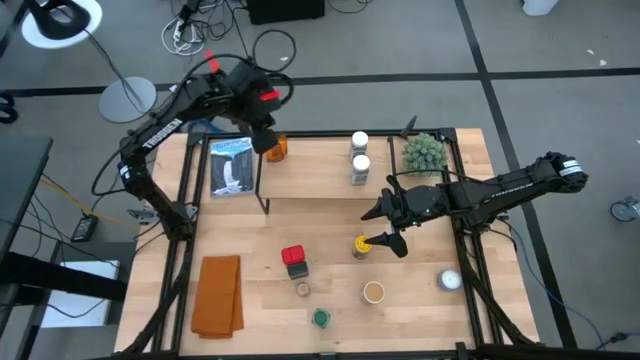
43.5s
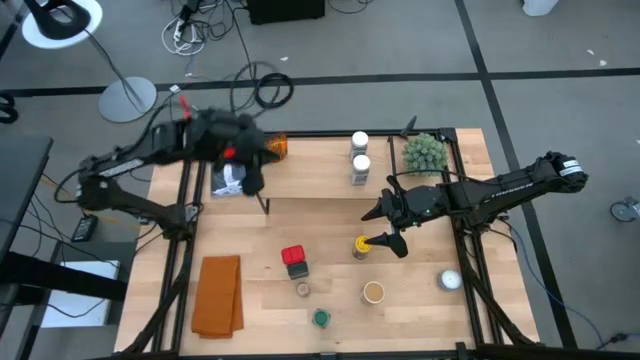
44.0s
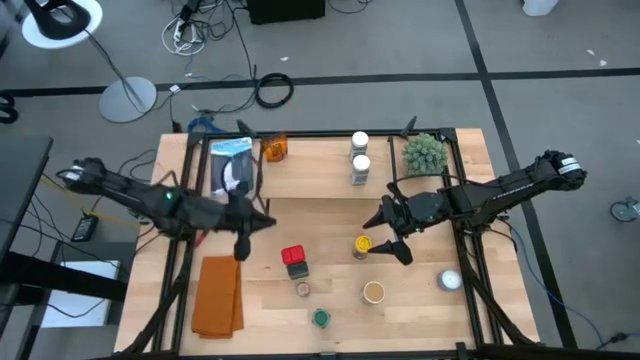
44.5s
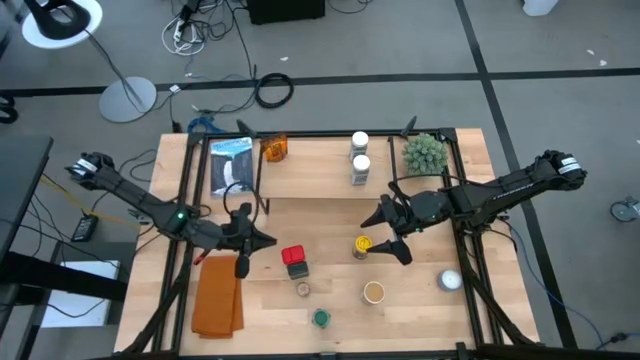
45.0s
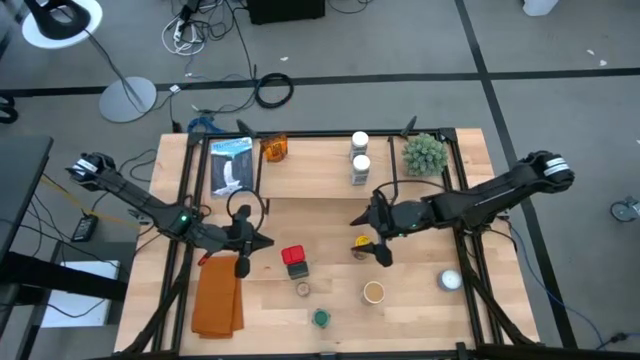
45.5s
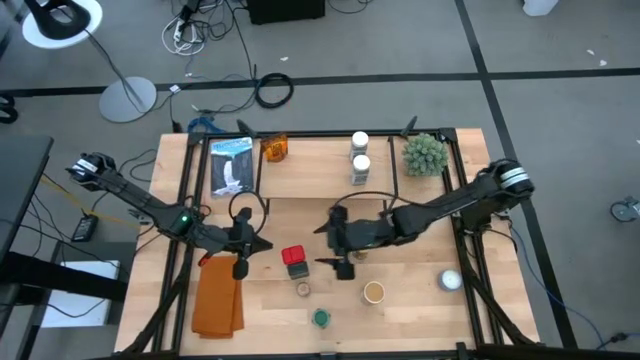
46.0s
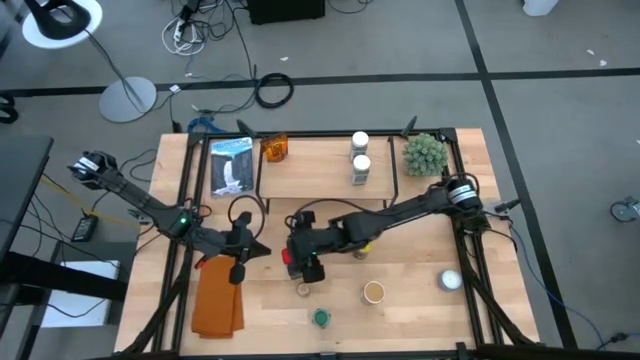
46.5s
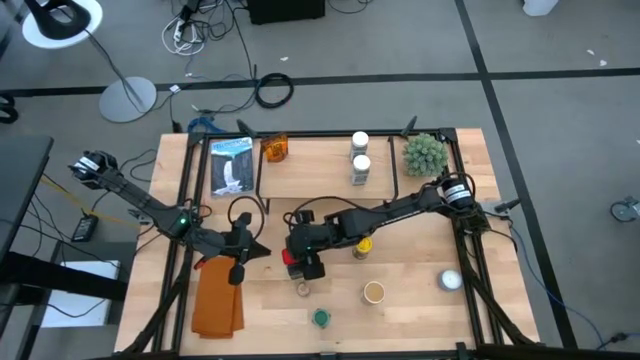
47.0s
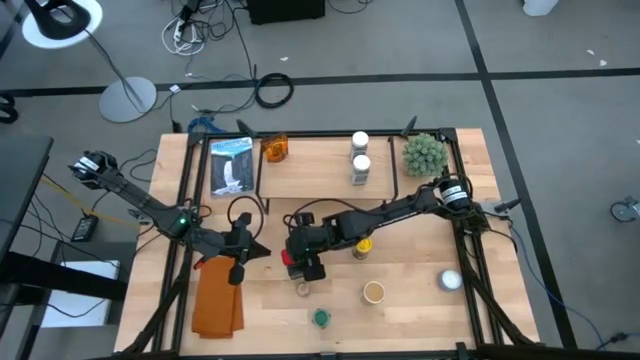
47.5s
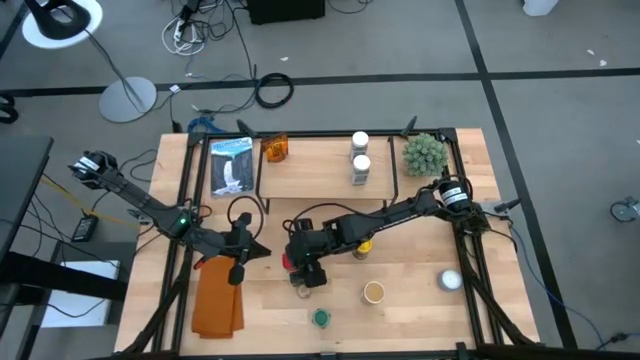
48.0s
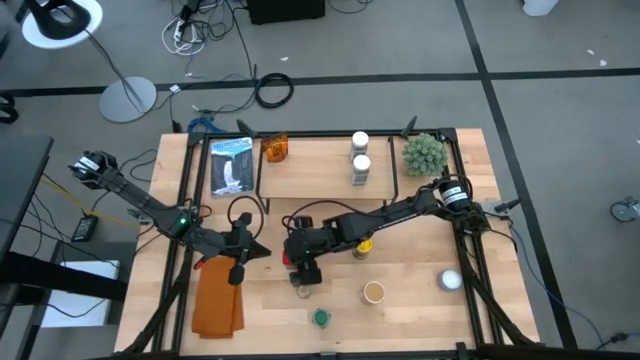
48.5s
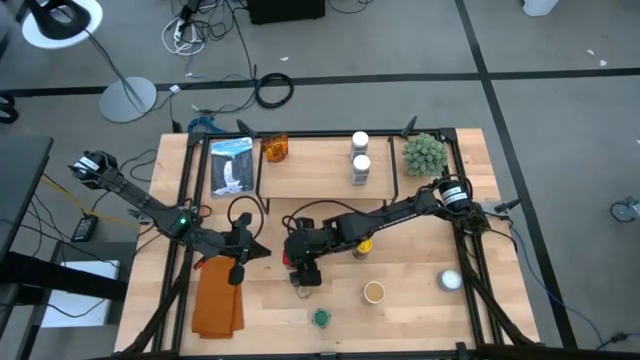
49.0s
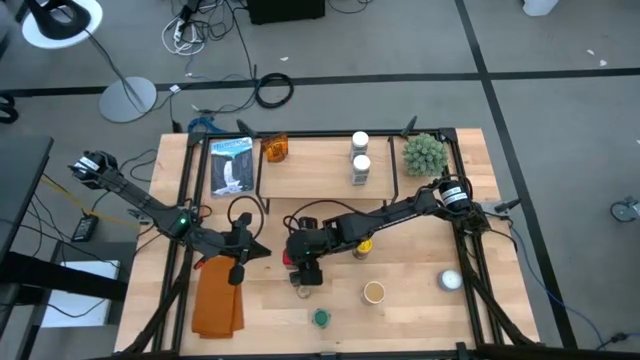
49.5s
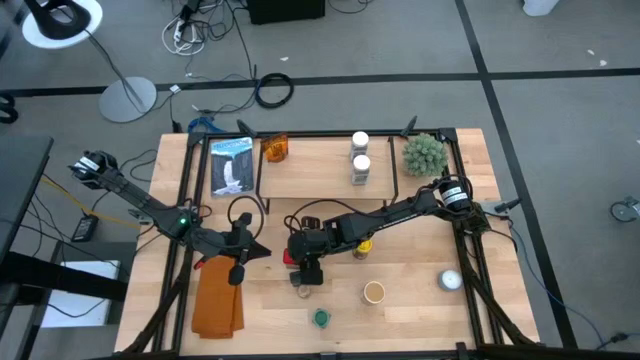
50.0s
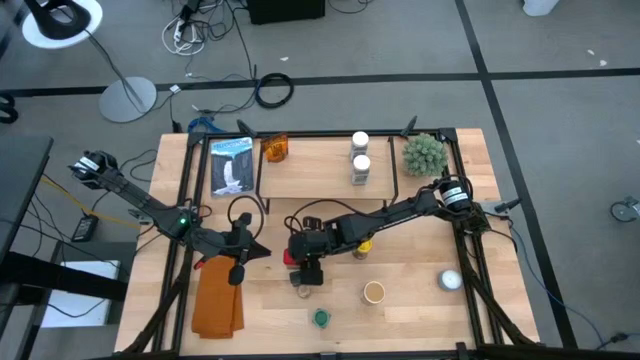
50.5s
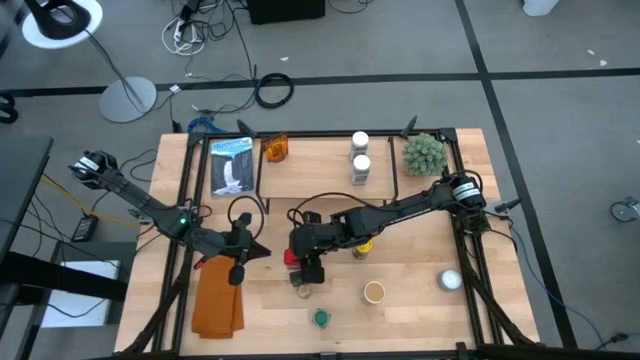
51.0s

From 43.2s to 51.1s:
Task: Shelf spices
Put the red seasoning can on the shelf

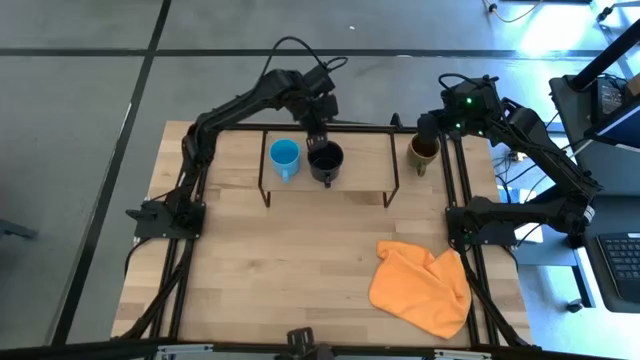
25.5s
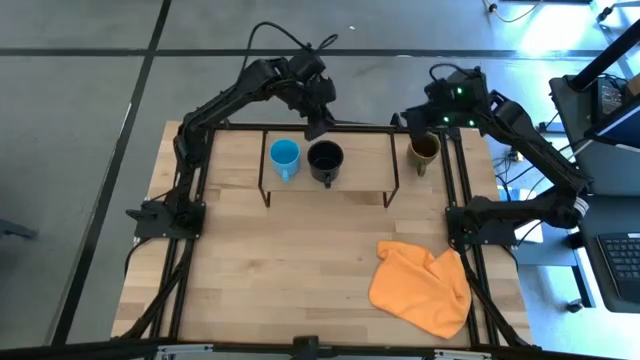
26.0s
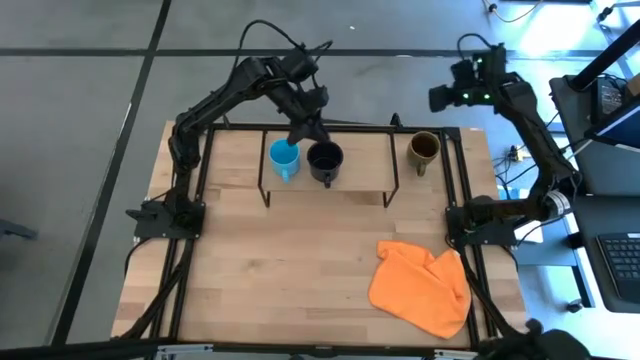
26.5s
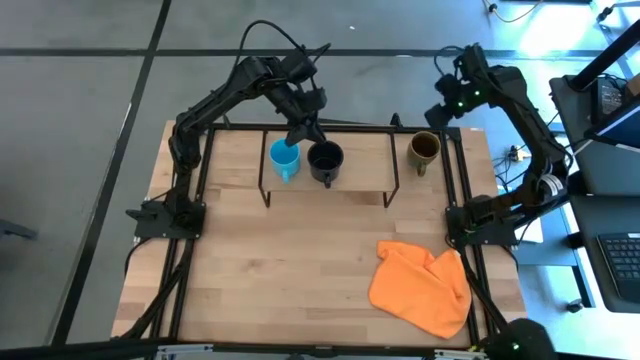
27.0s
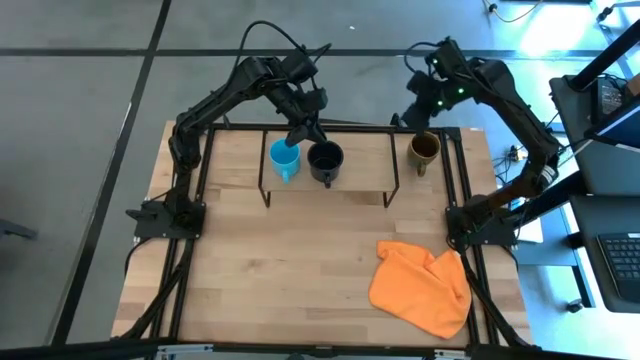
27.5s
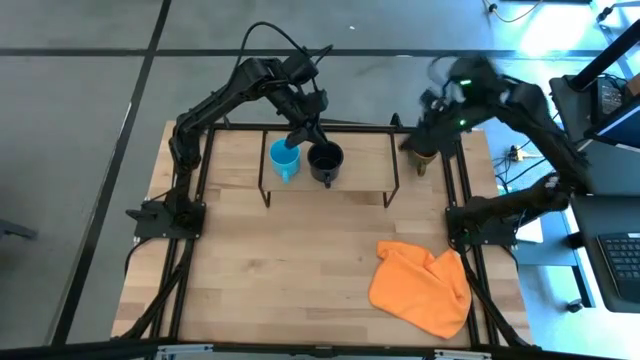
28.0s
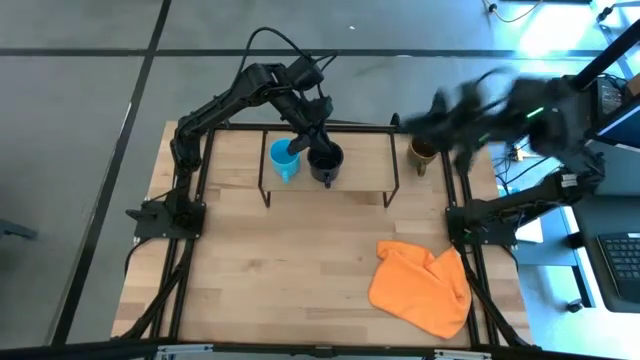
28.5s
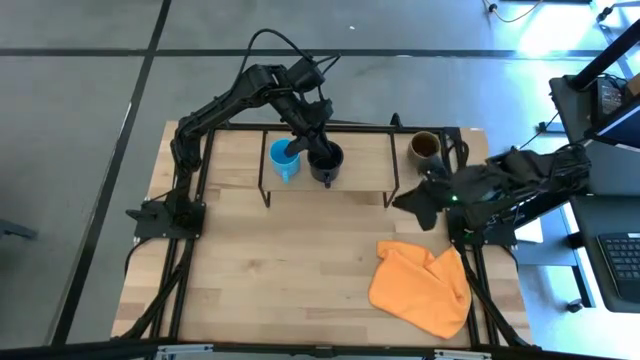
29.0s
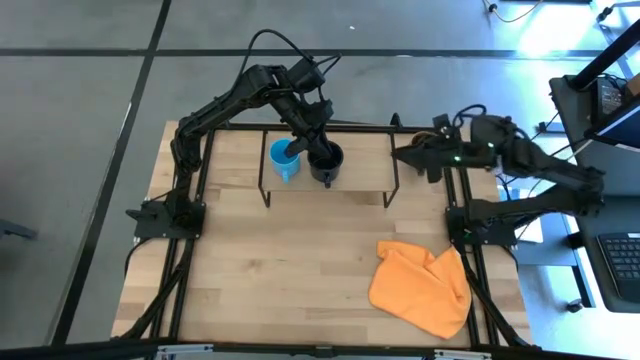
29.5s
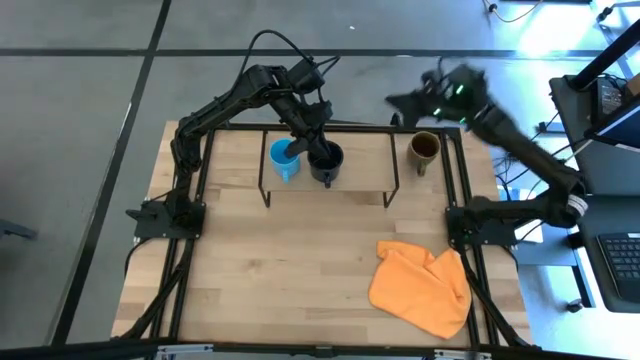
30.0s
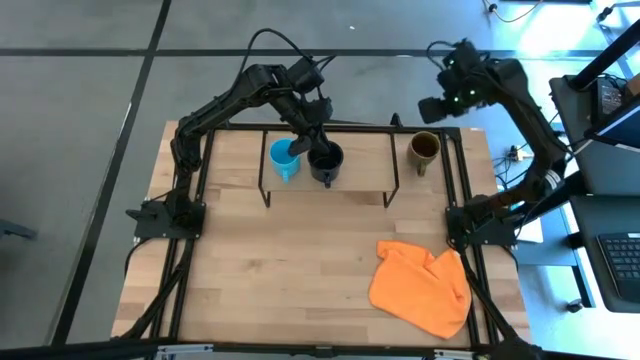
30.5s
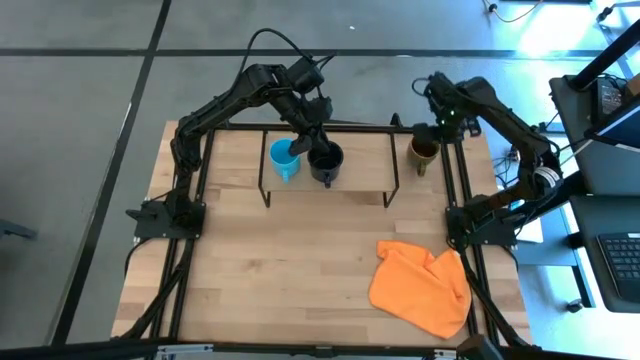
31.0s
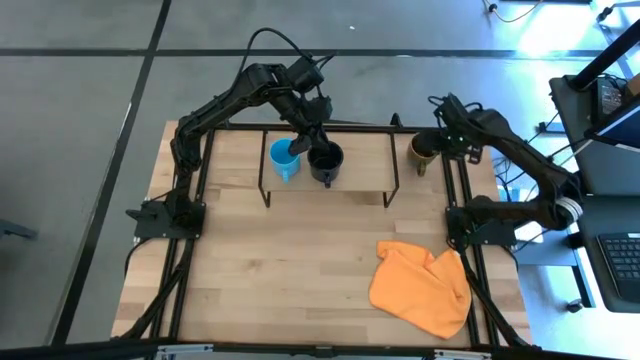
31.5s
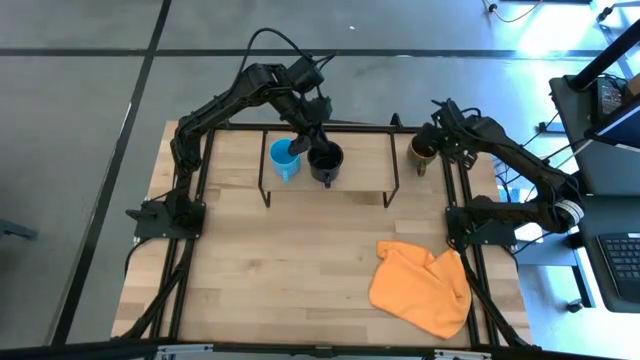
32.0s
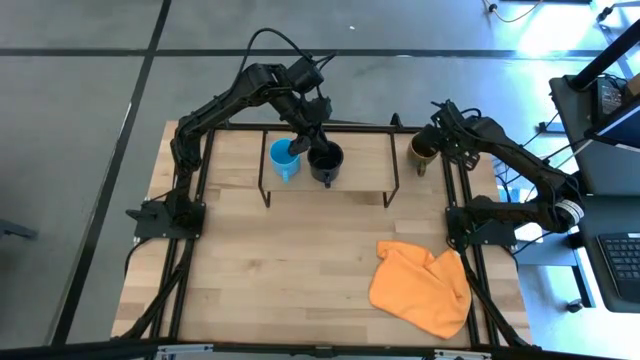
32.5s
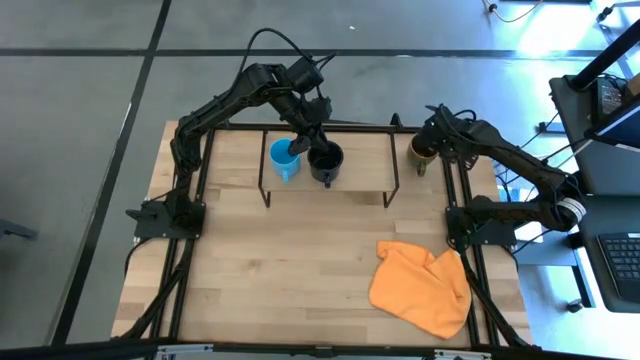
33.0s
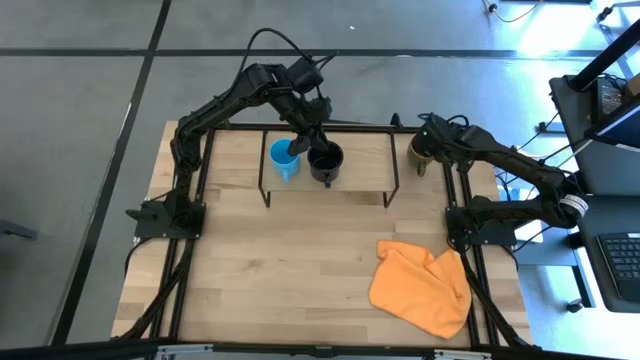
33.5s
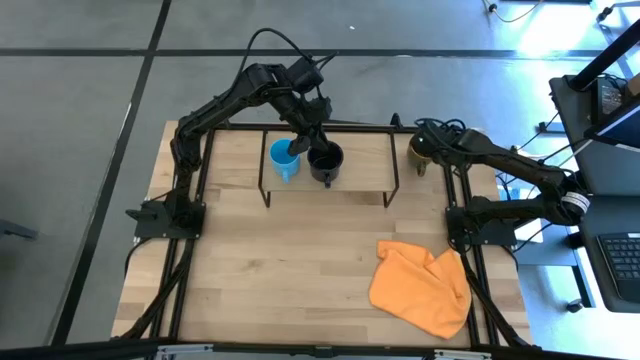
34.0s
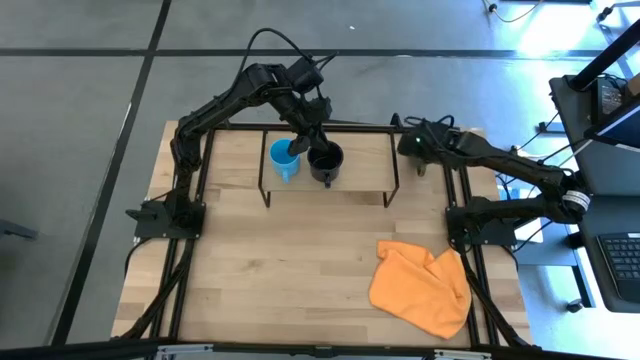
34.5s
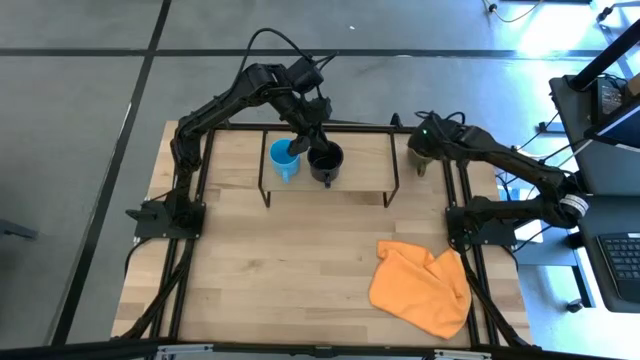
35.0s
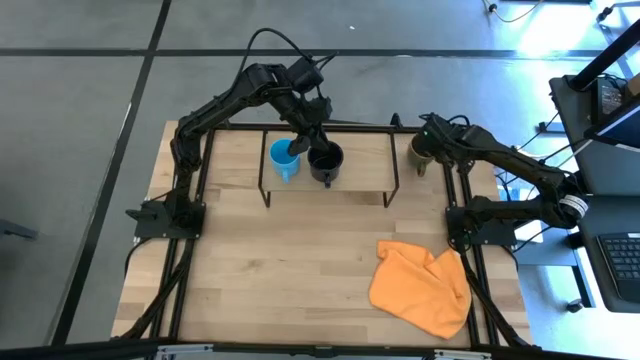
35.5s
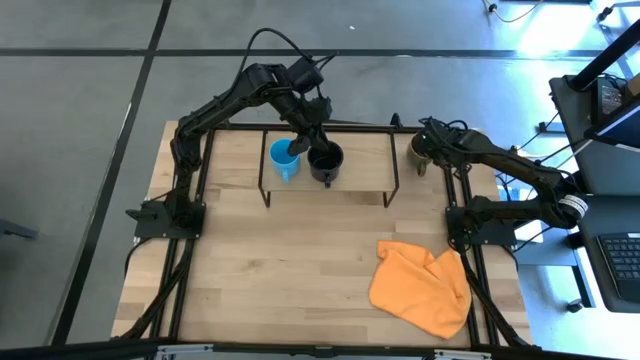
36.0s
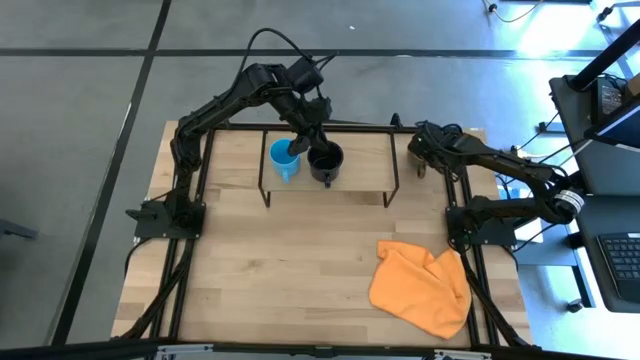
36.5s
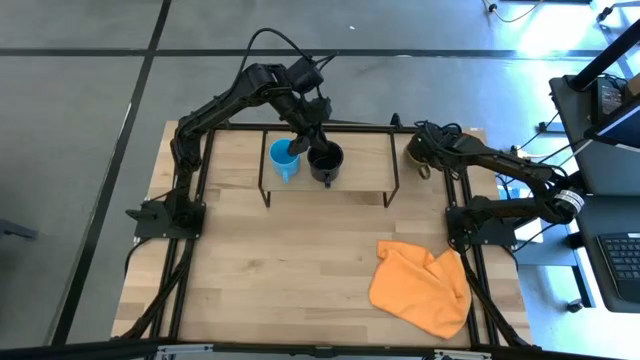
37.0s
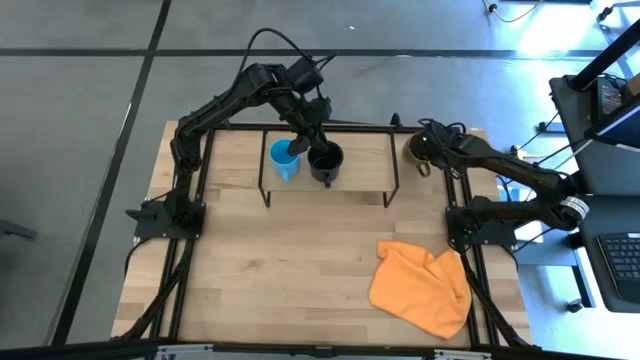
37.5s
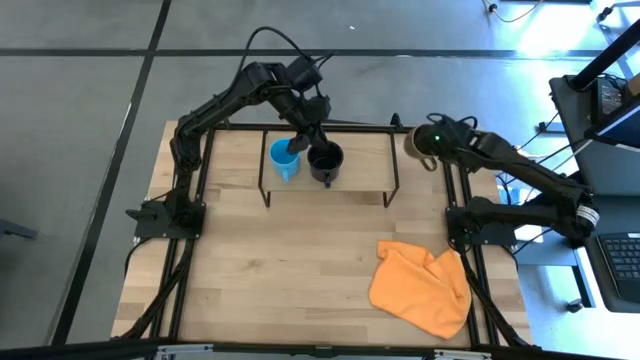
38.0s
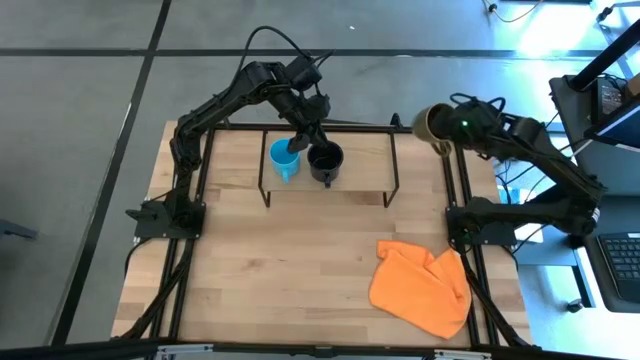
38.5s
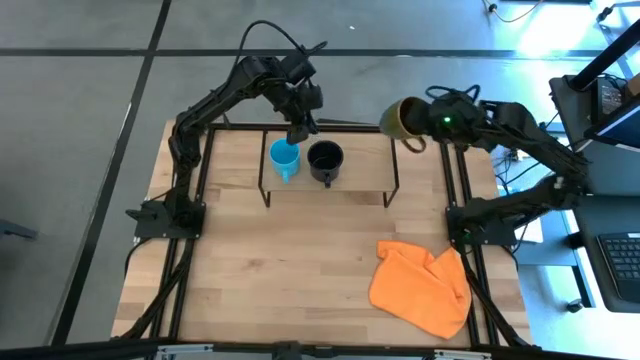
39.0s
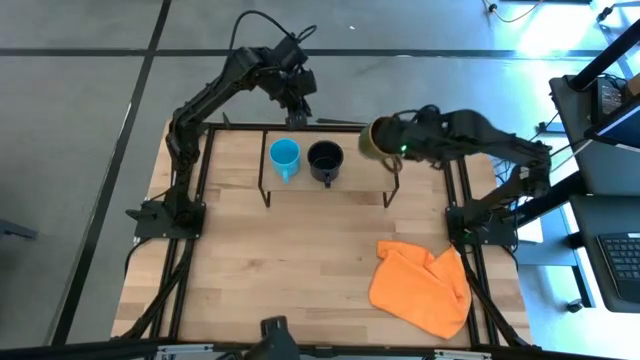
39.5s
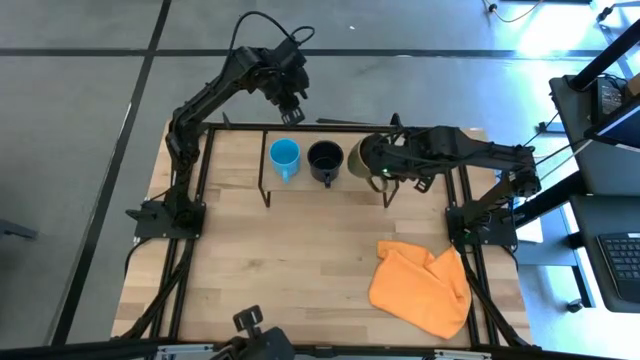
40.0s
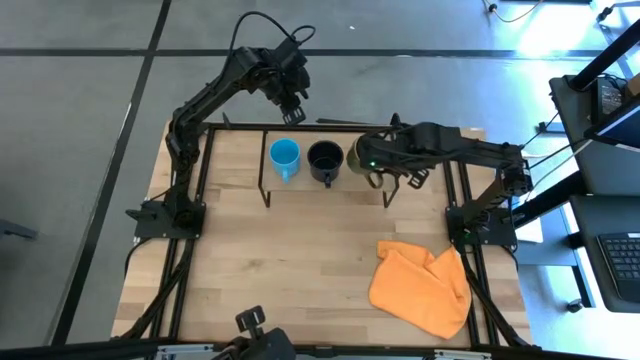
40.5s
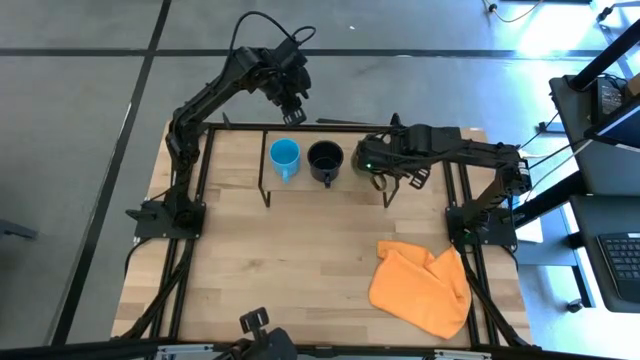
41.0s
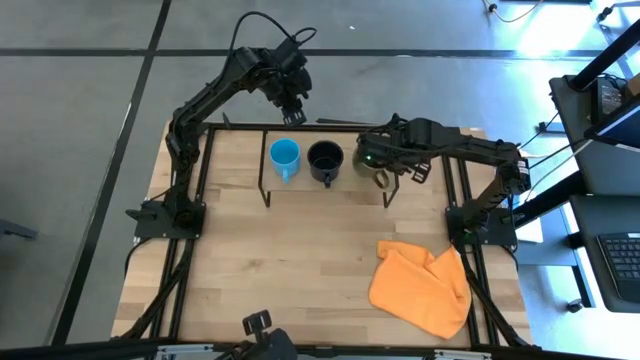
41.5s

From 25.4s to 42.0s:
Task: Stack small to large cups/mugs on shelf
Put the brown mug on the shelf
